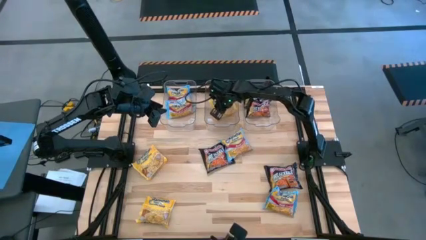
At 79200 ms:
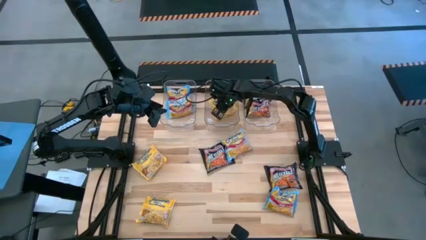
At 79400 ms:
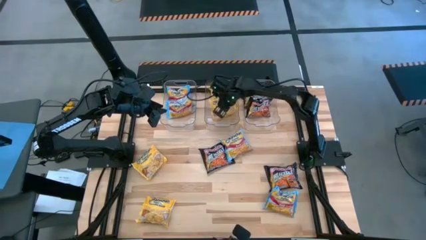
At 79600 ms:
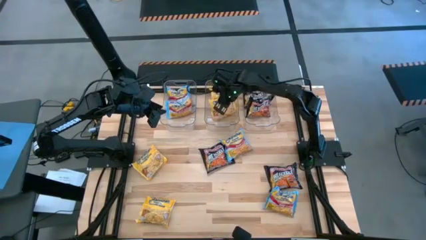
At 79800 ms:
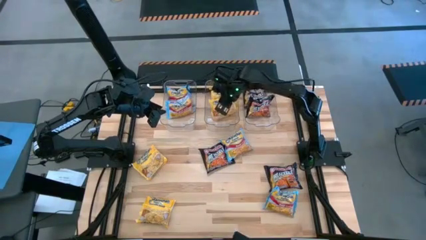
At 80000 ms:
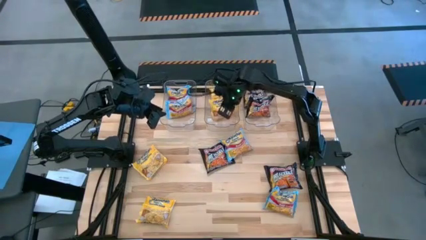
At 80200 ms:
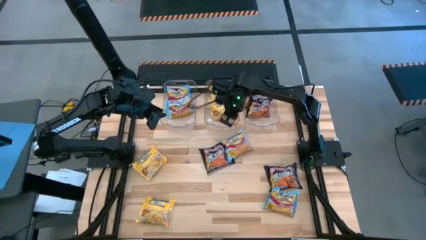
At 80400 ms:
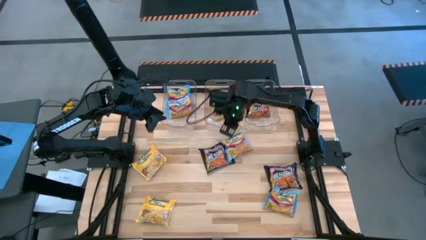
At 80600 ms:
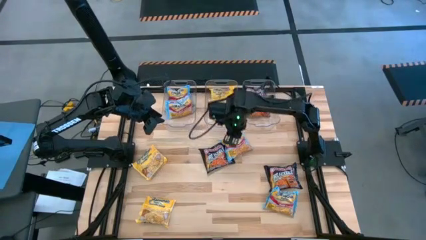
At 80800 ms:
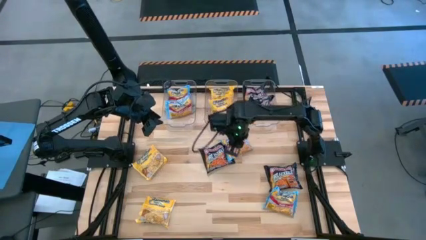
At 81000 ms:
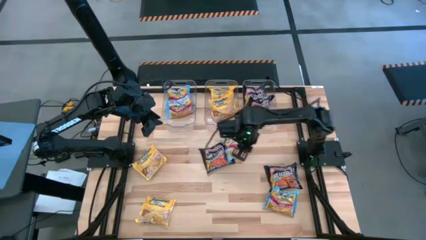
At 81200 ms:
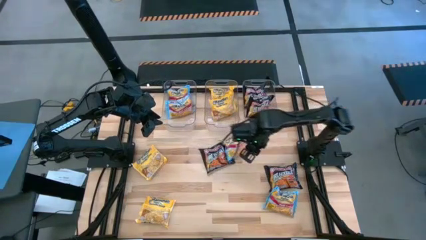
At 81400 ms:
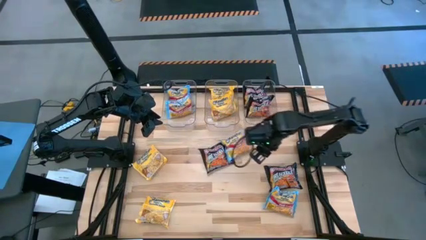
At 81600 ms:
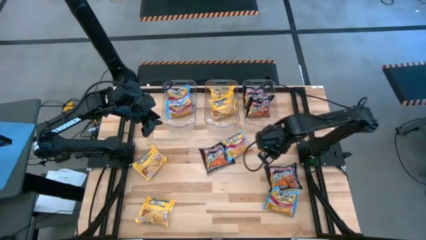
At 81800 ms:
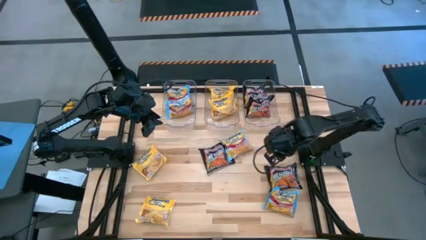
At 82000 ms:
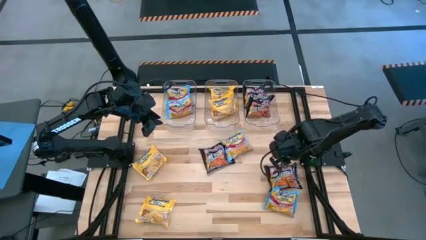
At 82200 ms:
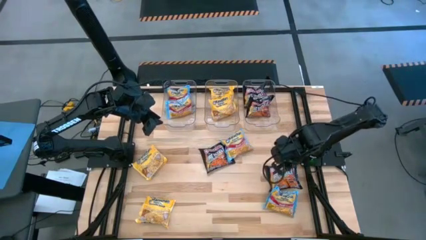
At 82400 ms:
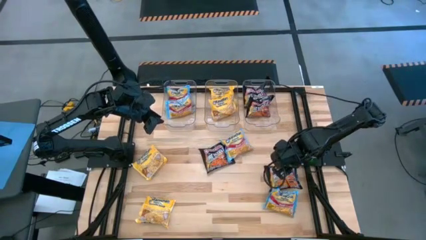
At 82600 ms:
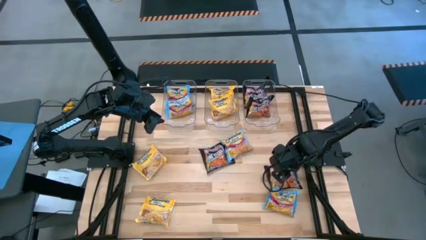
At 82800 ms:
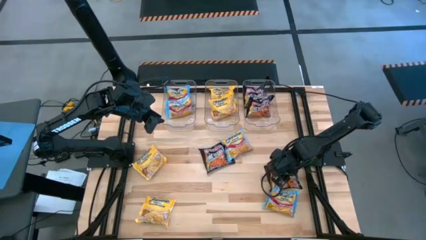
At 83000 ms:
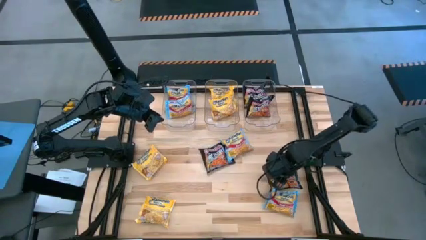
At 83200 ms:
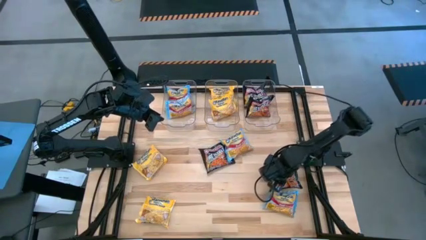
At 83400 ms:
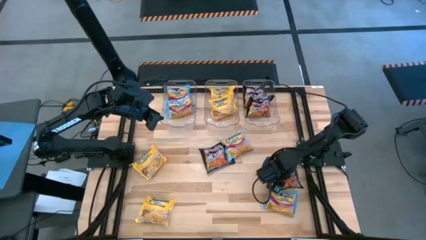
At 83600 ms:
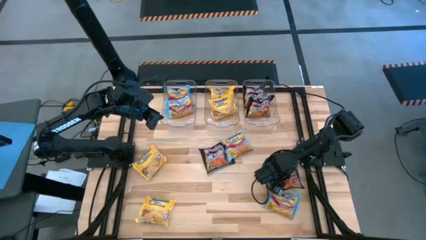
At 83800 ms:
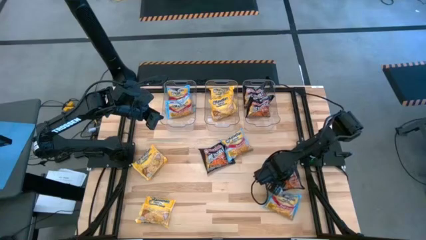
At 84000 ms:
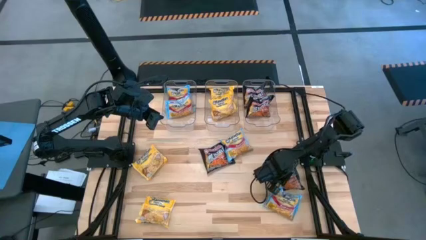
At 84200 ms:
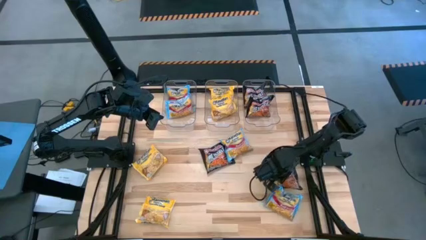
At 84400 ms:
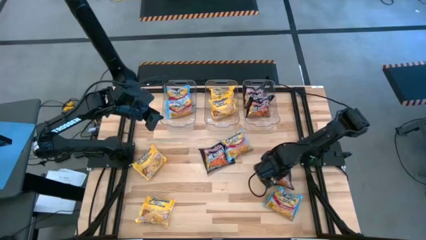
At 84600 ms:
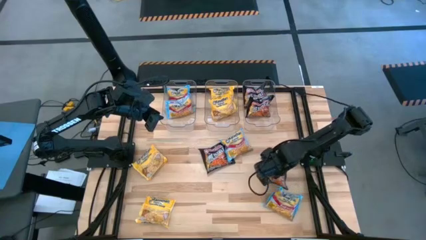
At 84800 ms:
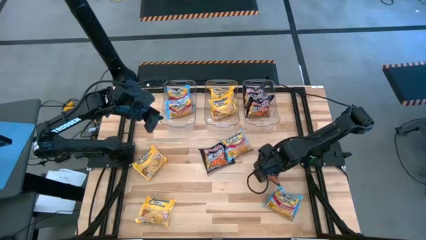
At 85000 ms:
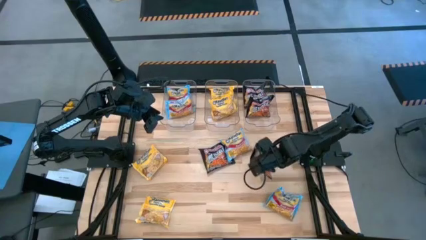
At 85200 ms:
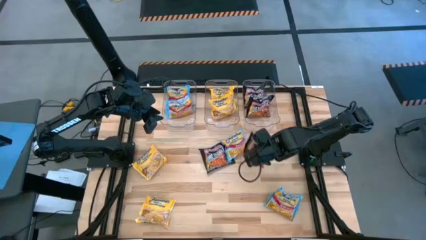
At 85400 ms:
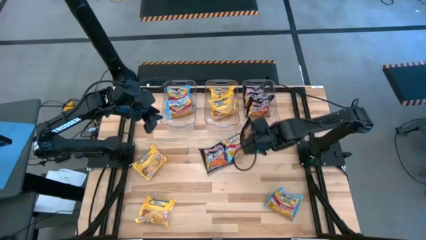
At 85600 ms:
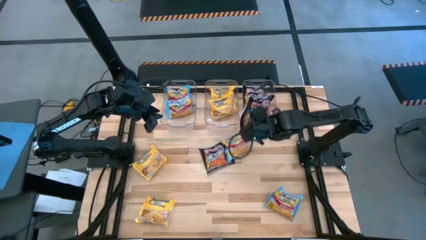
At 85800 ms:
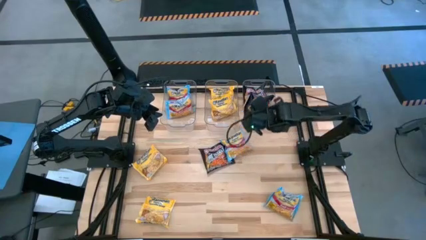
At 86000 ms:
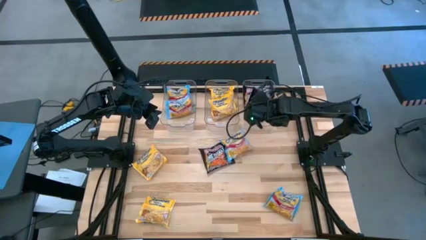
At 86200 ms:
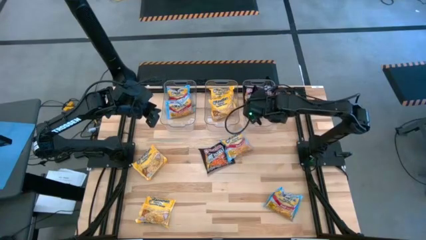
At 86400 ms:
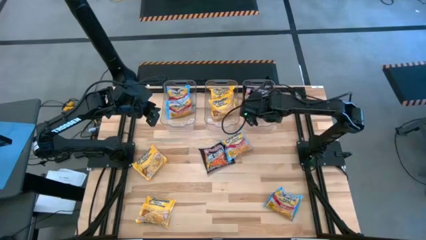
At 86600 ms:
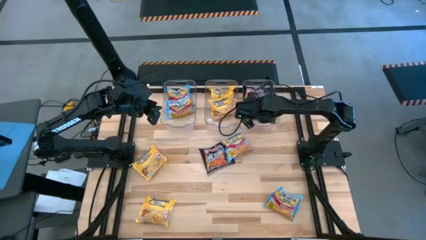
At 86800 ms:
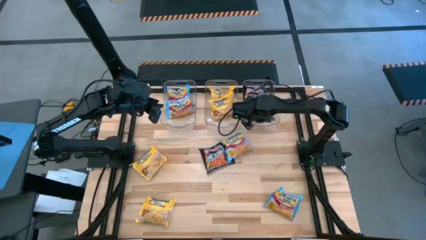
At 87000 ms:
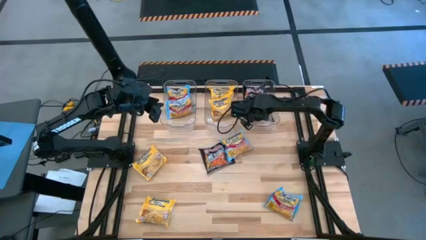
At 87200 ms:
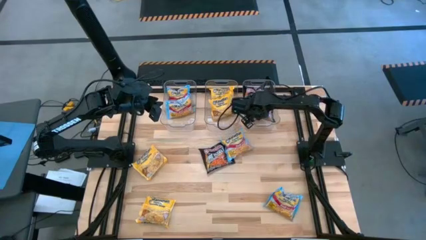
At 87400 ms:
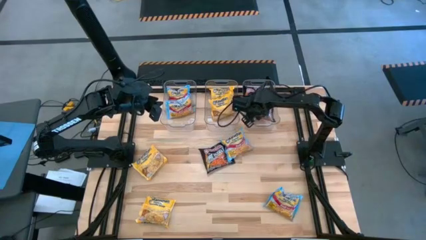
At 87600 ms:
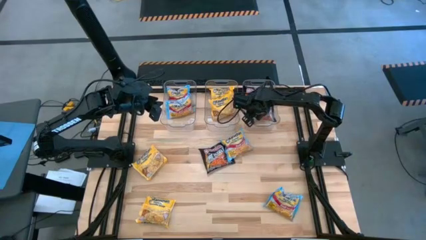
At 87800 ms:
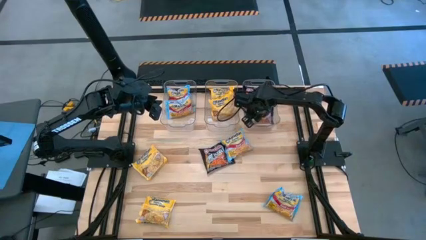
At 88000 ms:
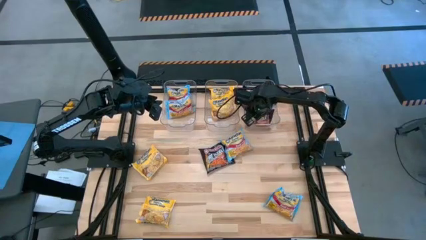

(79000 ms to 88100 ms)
Task: Sort Maruchan noodles
Put the black noodle pack into the right transparent bin
